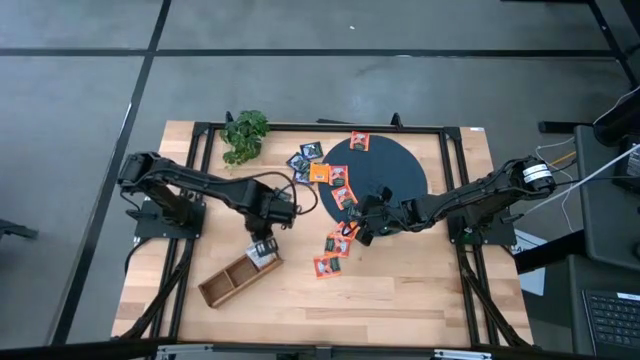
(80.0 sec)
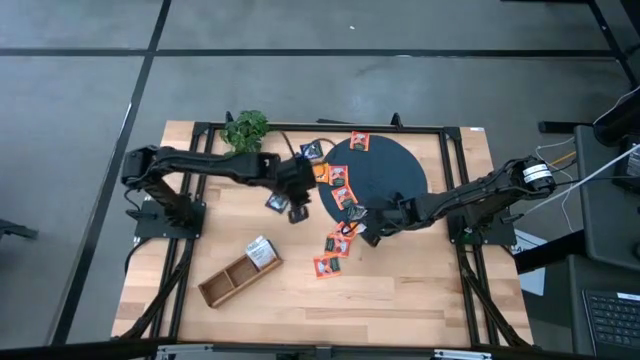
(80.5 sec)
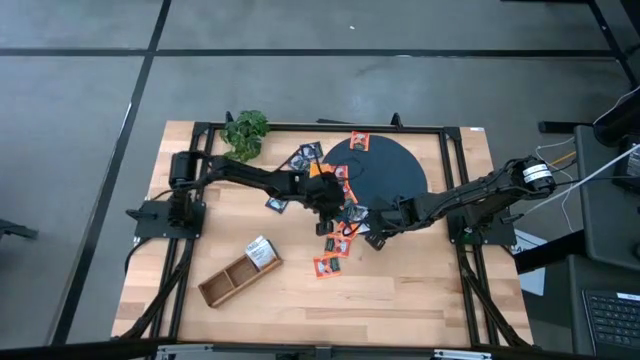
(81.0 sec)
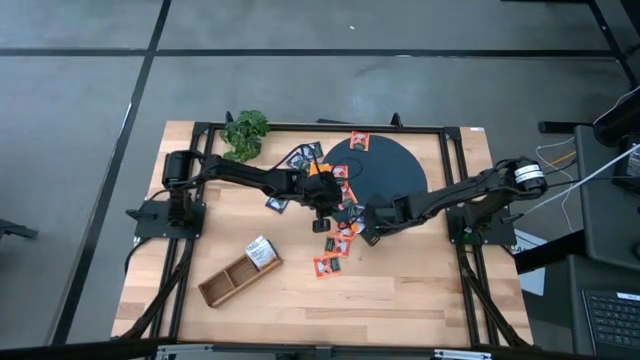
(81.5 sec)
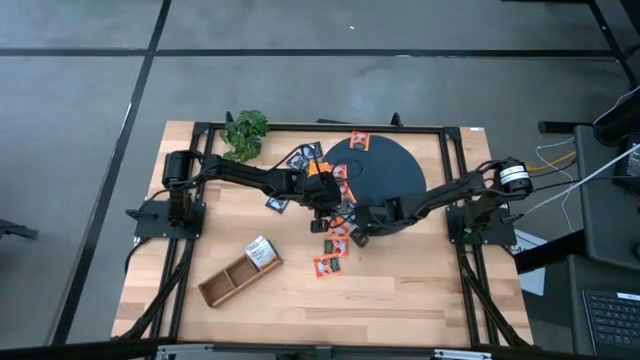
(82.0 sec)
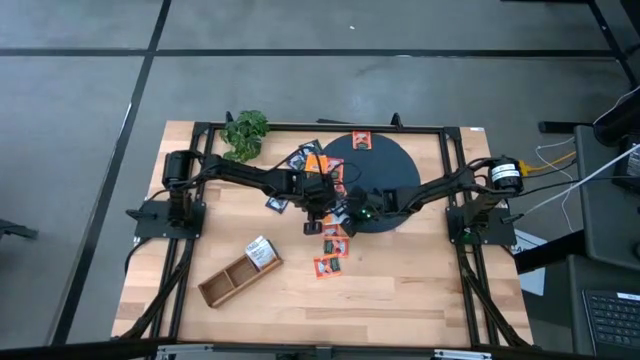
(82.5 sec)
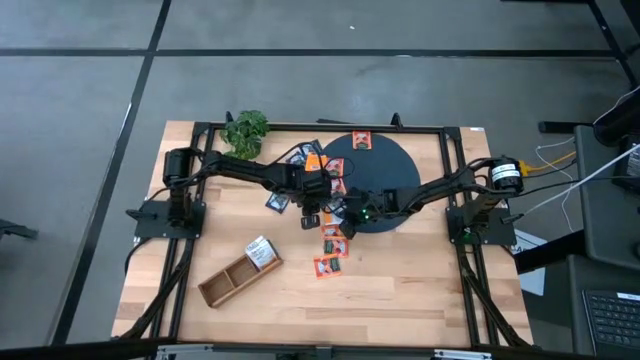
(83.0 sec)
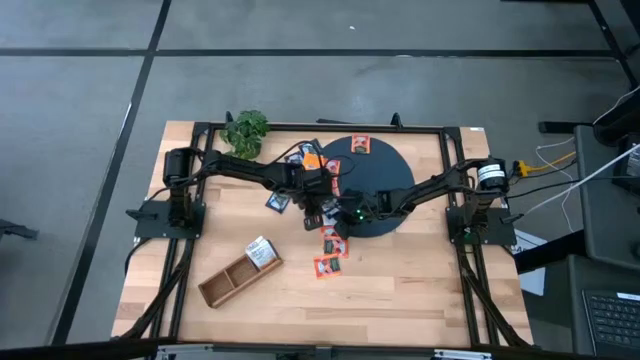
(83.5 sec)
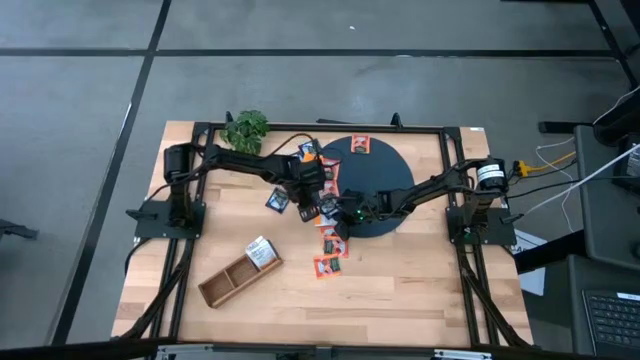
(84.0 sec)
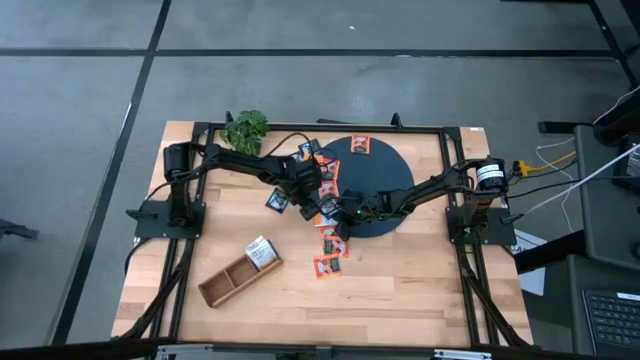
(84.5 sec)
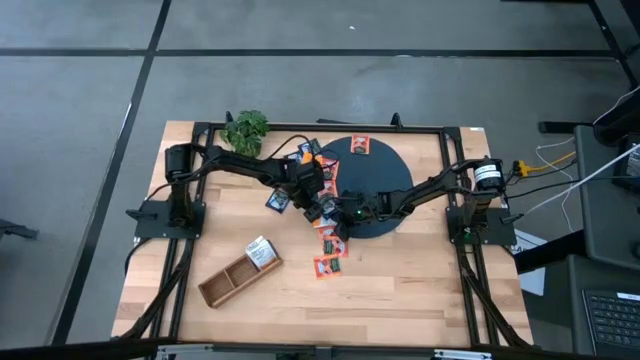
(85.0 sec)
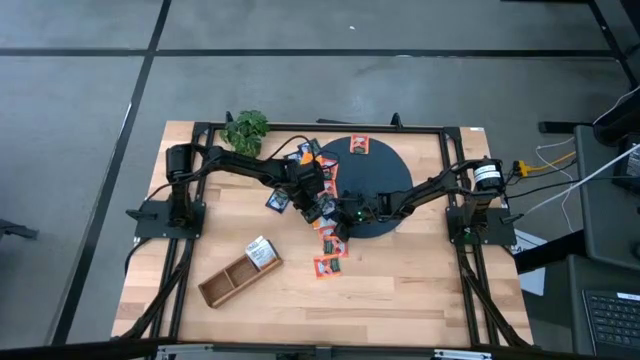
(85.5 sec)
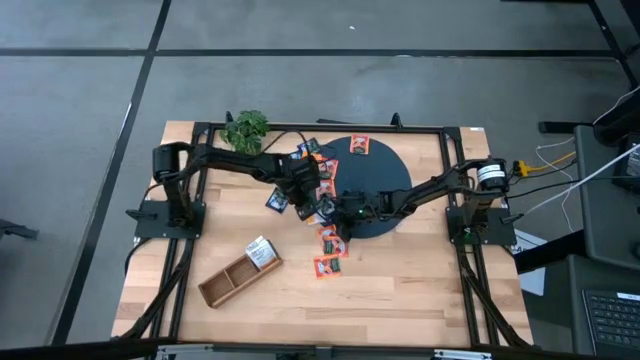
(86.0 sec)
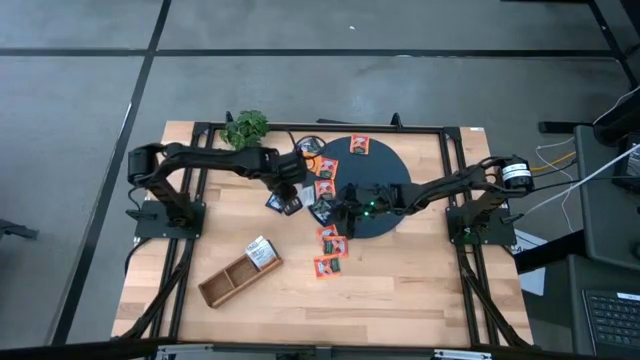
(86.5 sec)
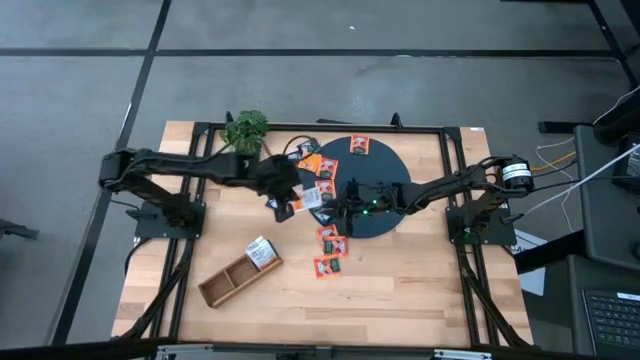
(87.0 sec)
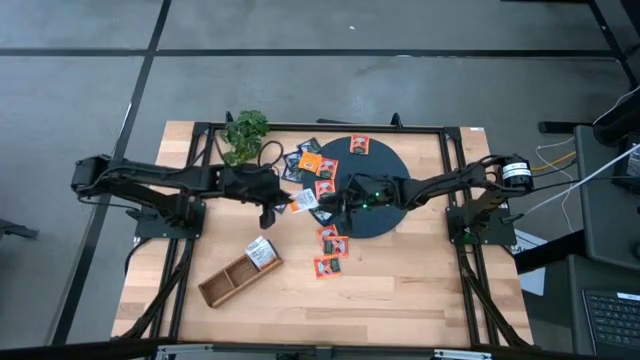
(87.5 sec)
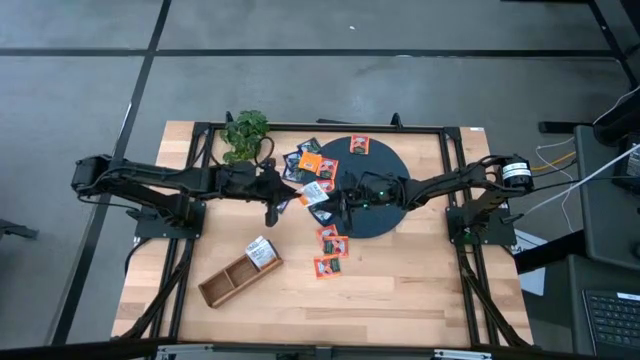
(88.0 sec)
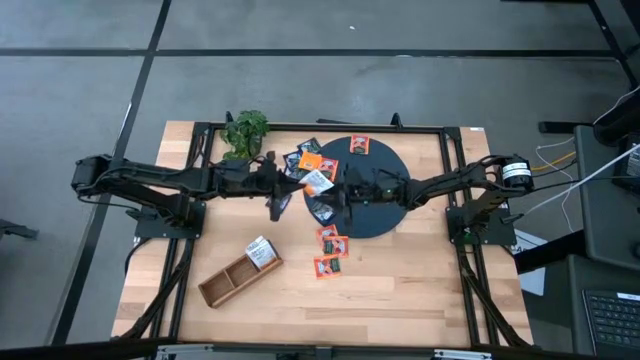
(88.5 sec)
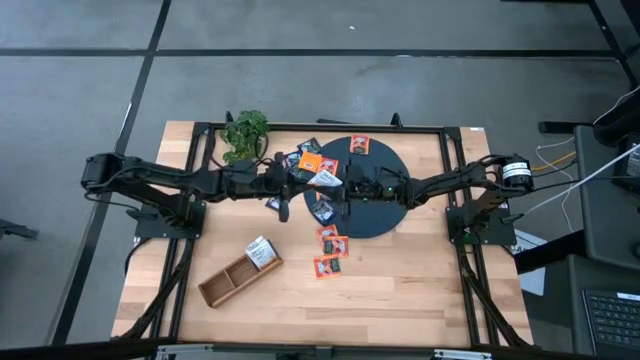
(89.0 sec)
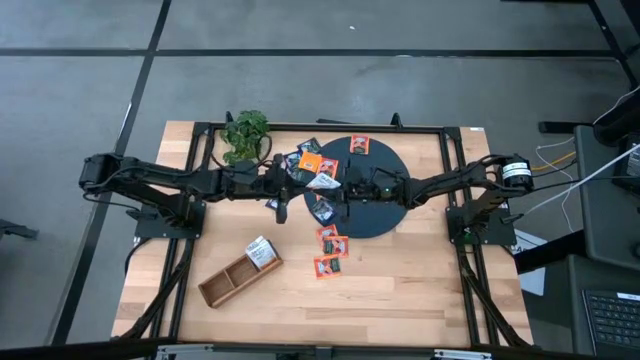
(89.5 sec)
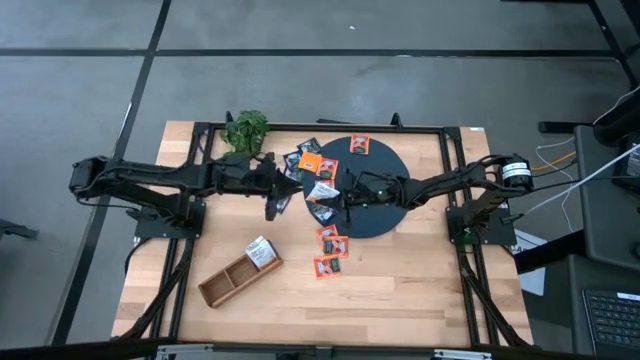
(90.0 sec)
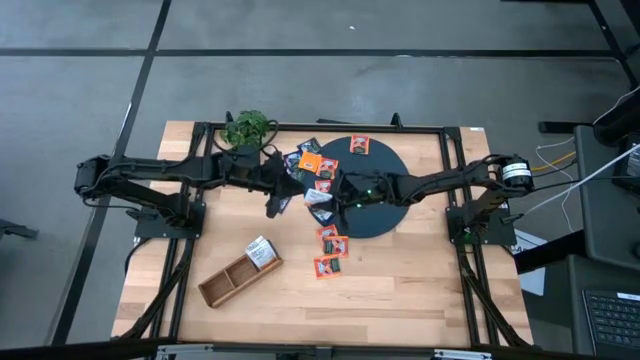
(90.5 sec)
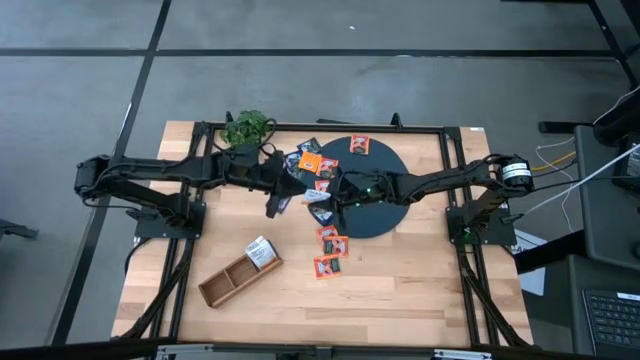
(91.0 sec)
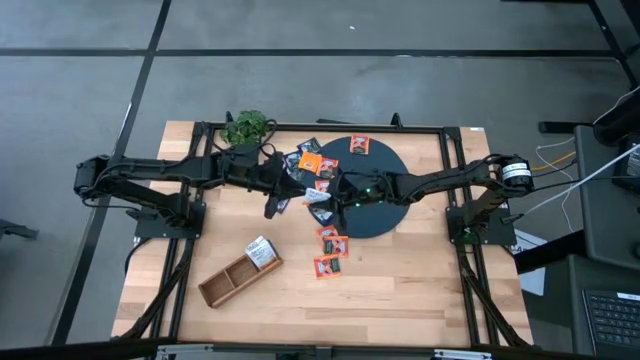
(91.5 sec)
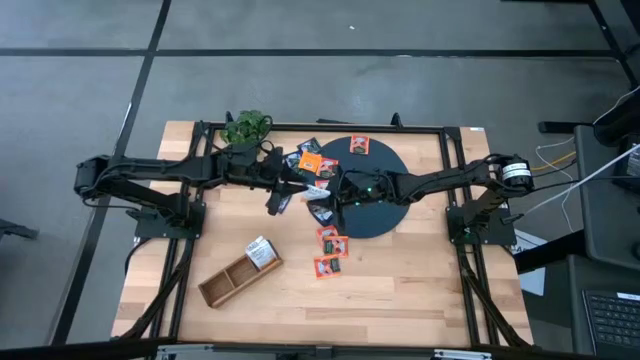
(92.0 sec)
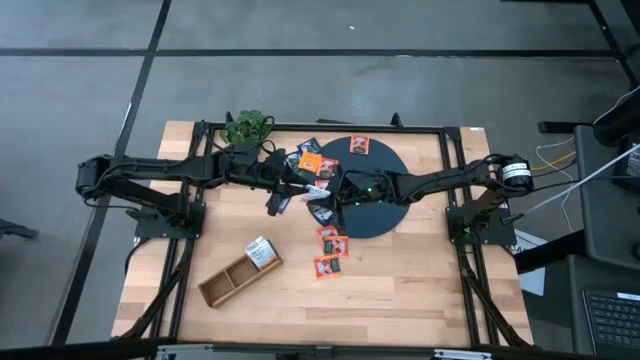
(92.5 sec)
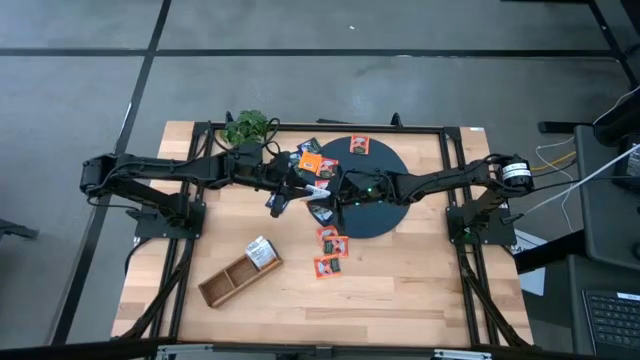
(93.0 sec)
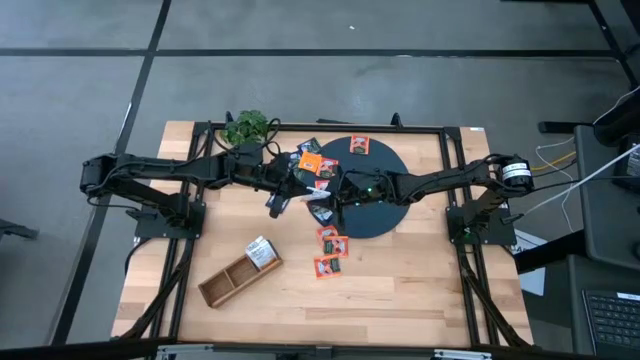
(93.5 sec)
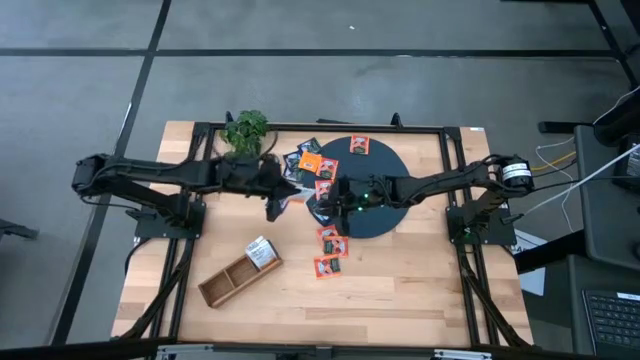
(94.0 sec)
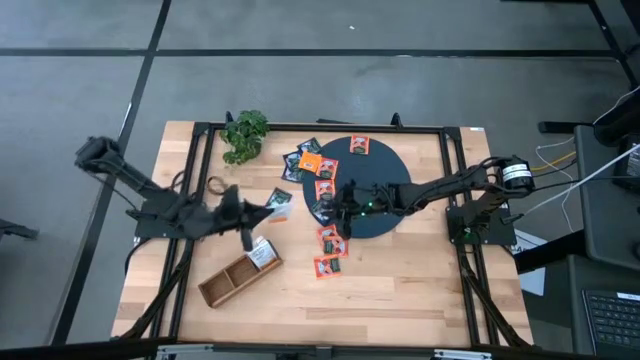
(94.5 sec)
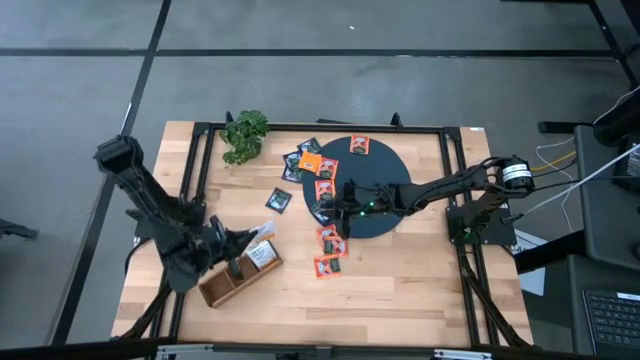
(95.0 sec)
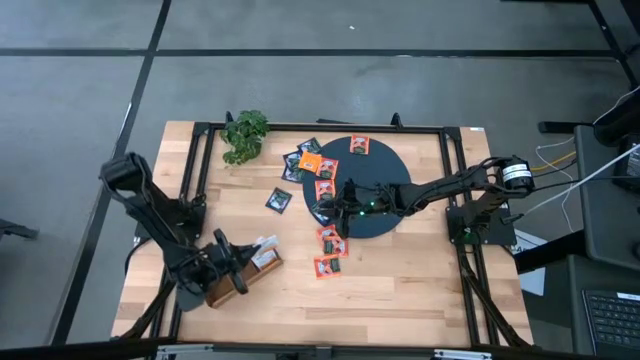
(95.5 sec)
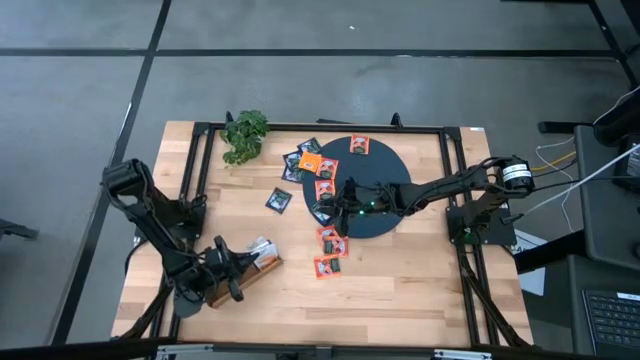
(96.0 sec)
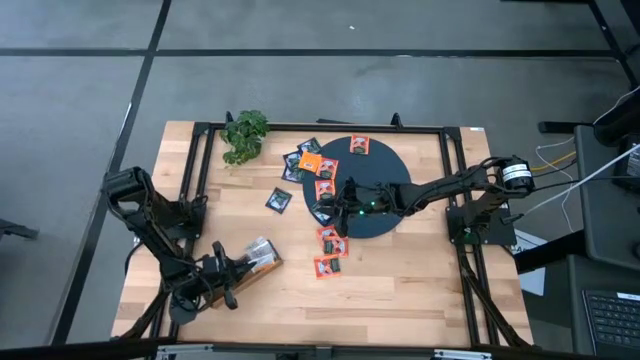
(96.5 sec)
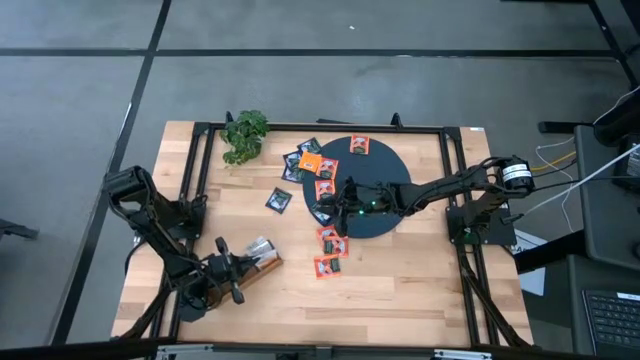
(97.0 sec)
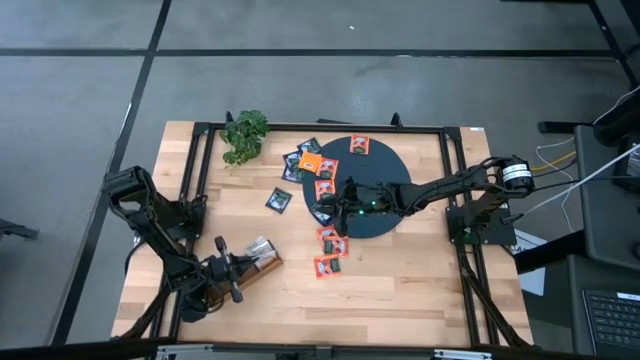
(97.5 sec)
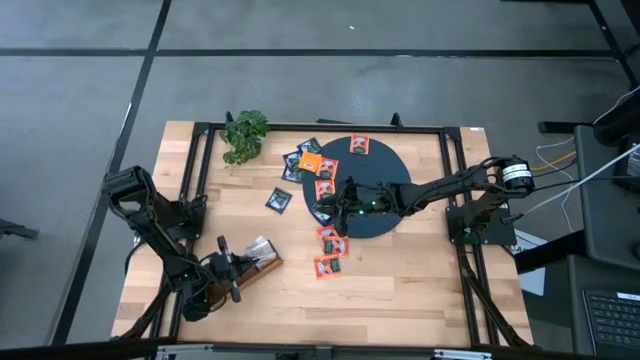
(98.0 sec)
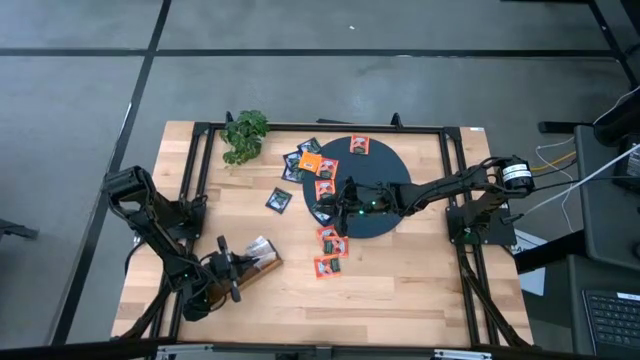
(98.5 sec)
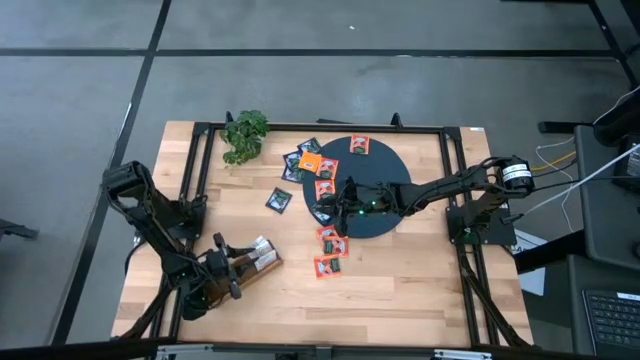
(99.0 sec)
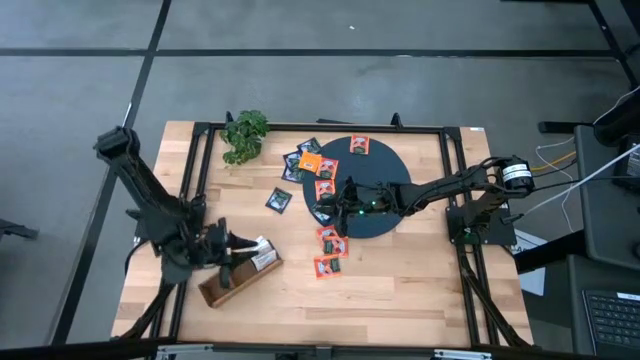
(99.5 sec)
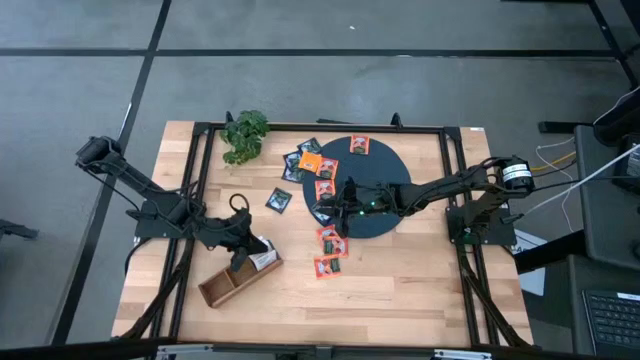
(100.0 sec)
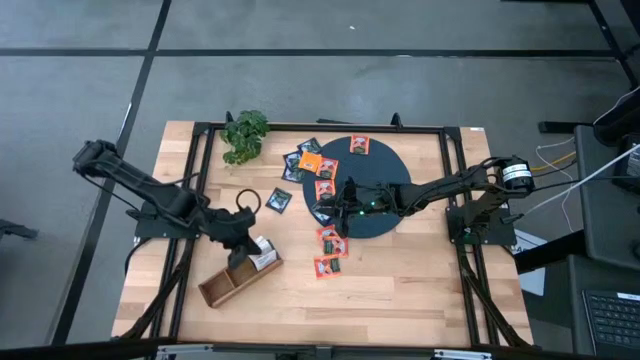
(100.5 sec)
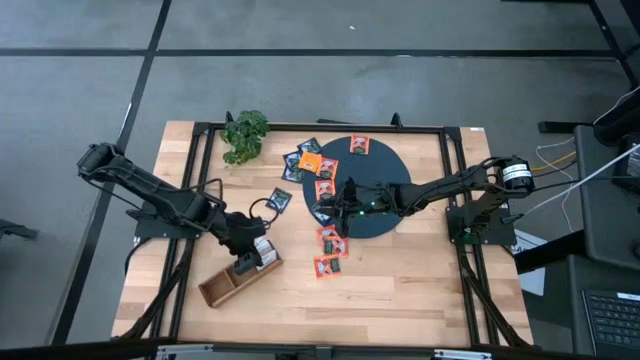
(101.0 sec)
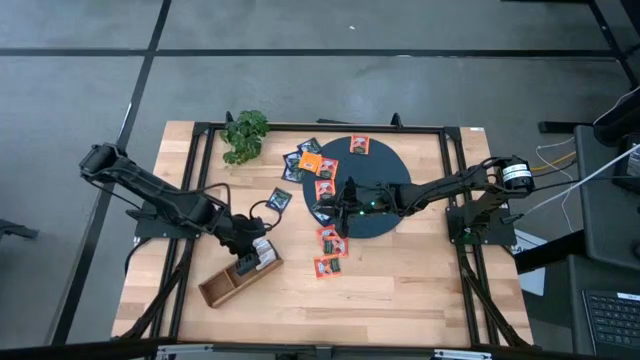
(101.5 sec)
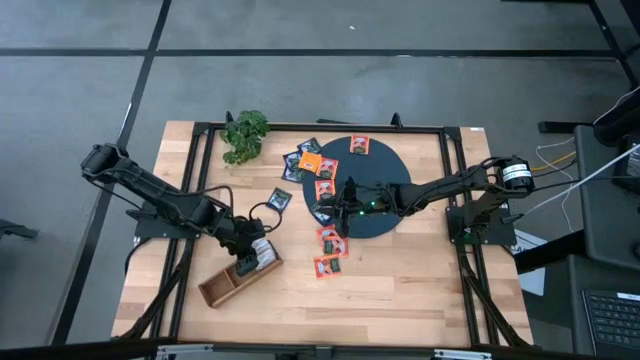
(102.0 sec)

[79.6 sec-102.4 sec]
Task: Pick & Place Tea
Put the white tea bag into the right section of the wooden organizer
